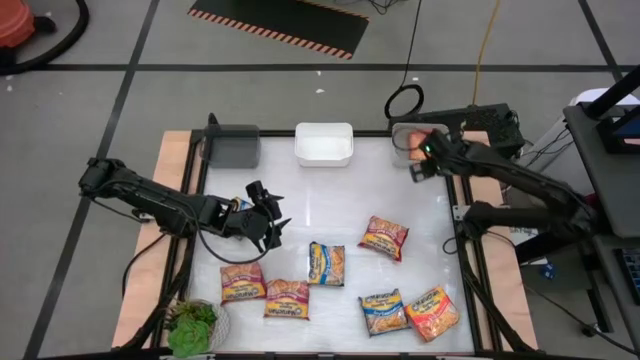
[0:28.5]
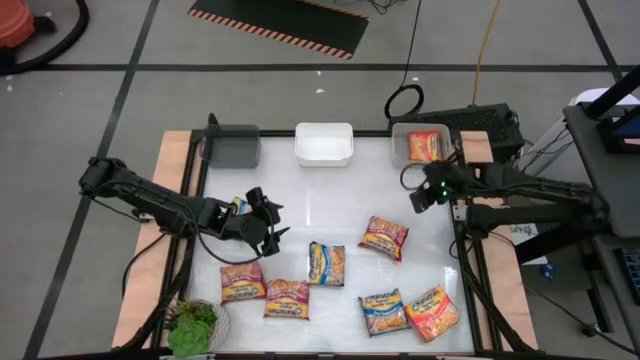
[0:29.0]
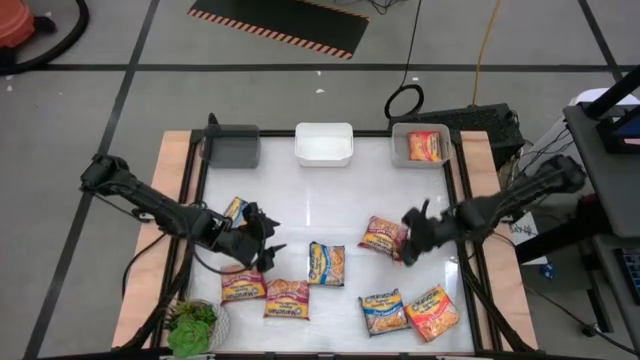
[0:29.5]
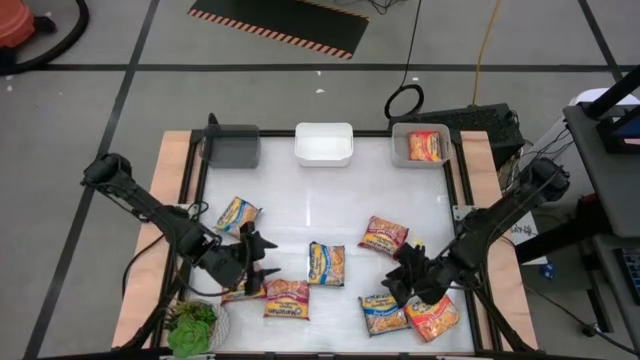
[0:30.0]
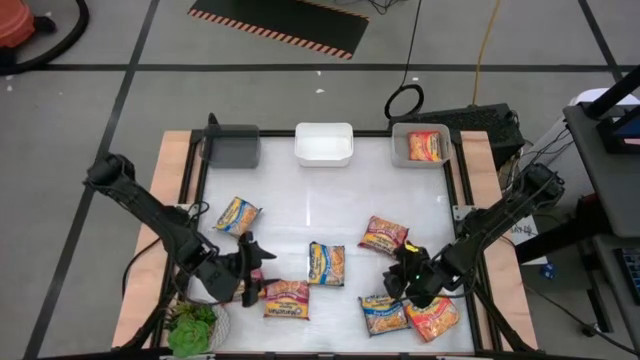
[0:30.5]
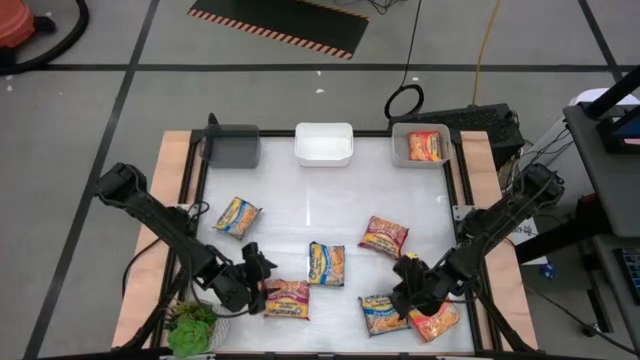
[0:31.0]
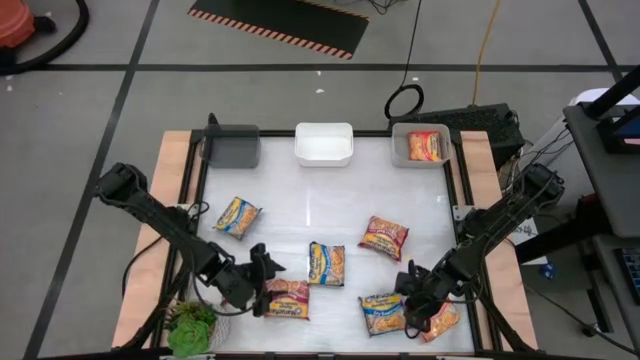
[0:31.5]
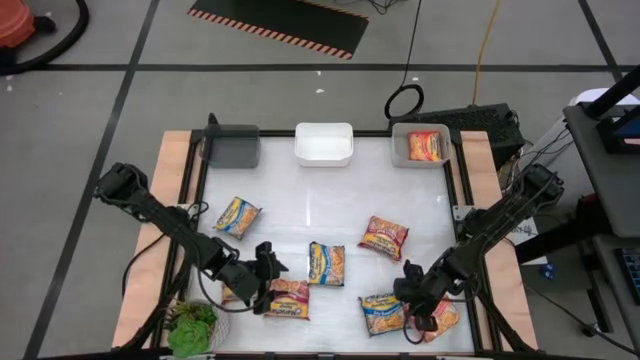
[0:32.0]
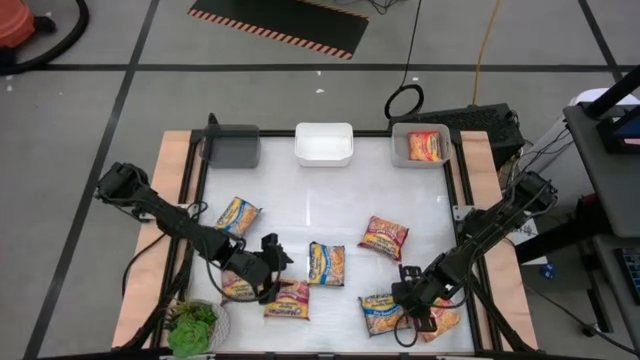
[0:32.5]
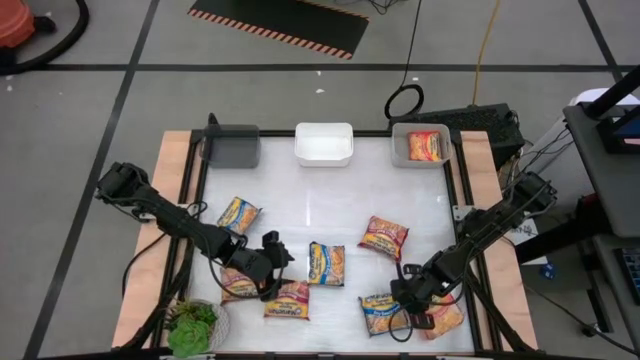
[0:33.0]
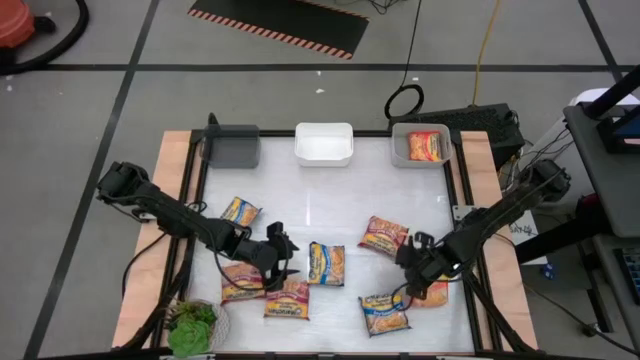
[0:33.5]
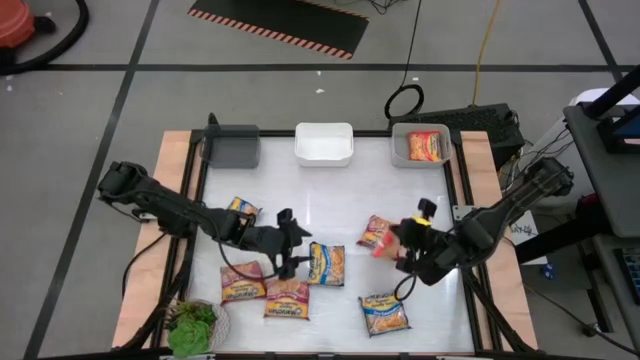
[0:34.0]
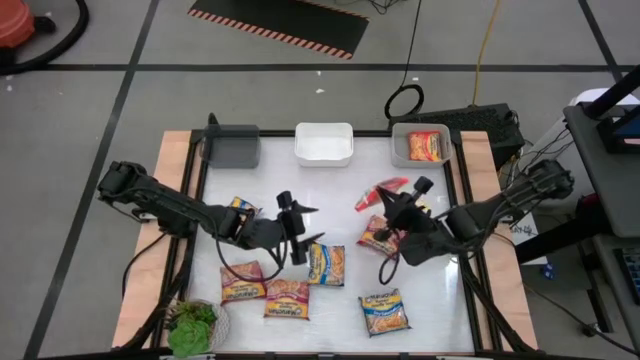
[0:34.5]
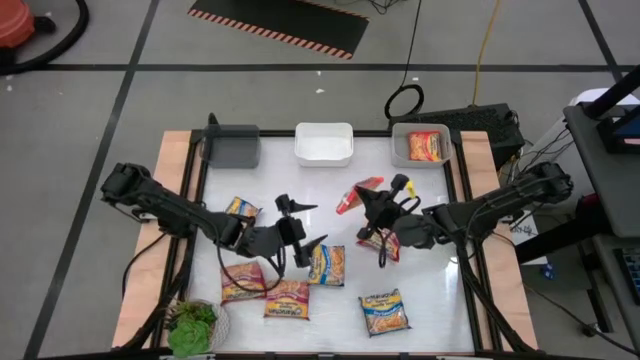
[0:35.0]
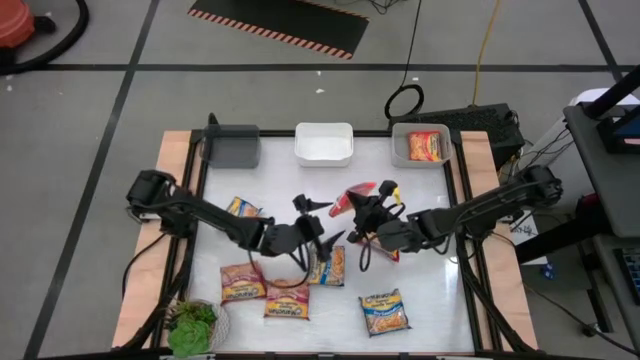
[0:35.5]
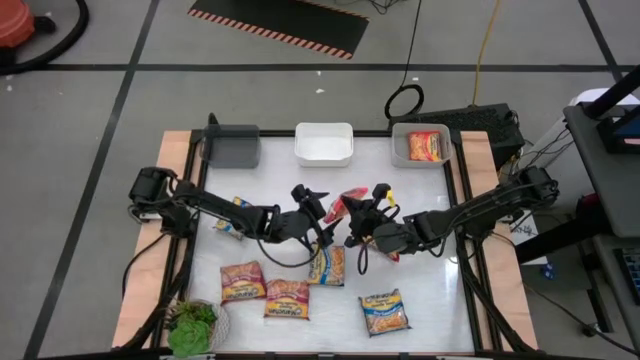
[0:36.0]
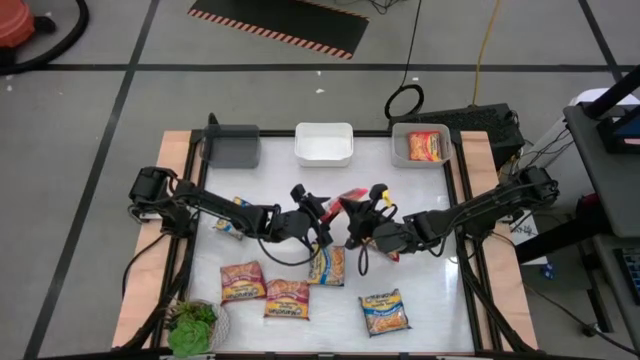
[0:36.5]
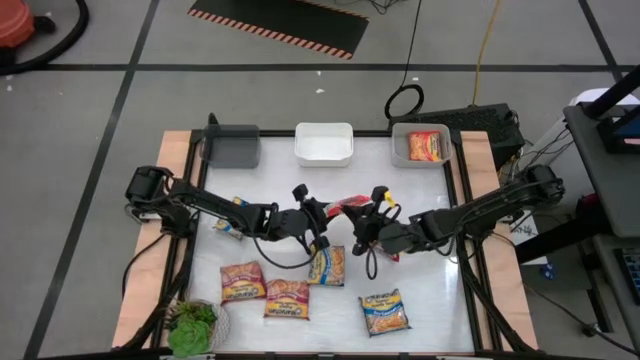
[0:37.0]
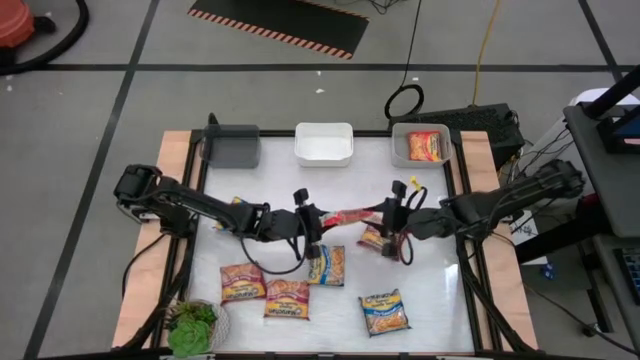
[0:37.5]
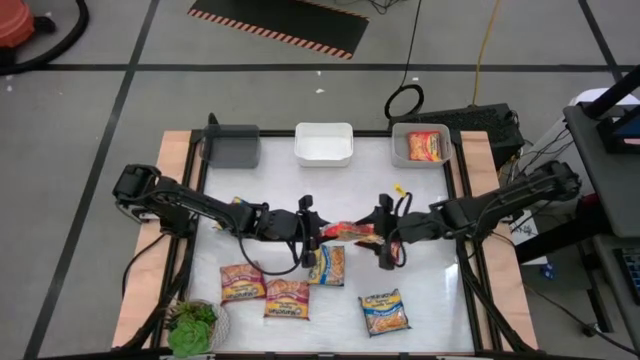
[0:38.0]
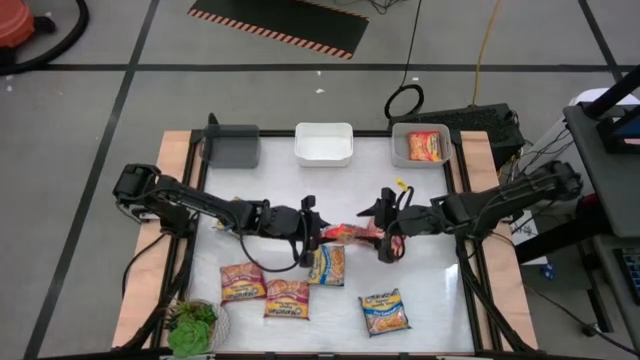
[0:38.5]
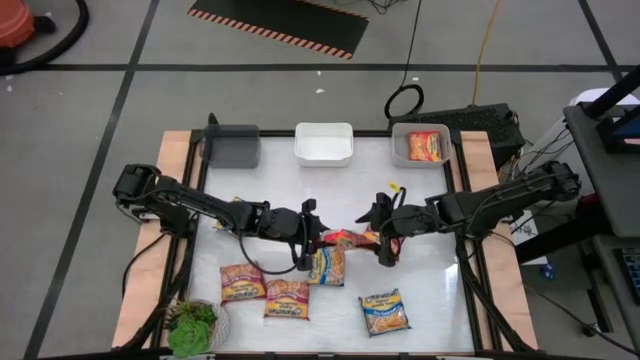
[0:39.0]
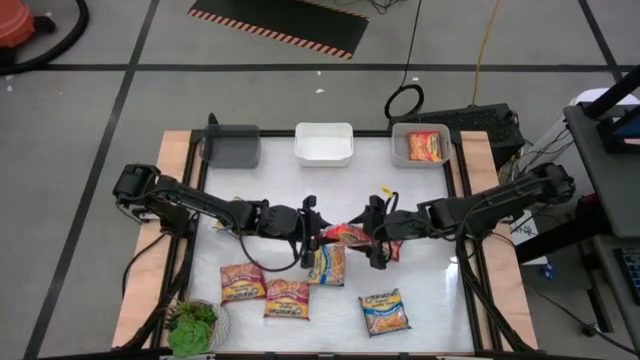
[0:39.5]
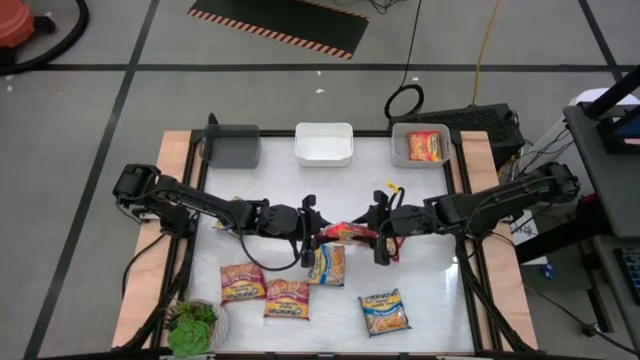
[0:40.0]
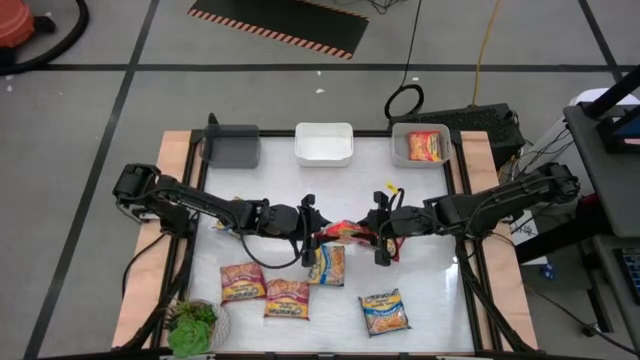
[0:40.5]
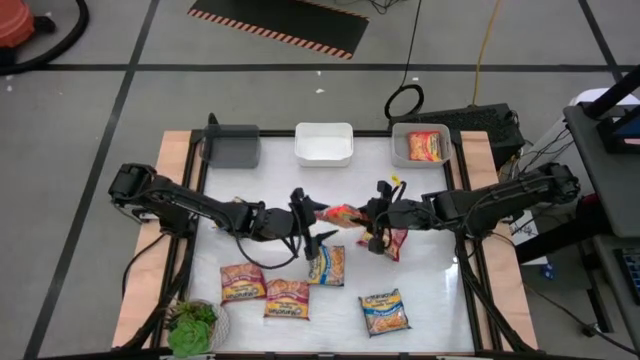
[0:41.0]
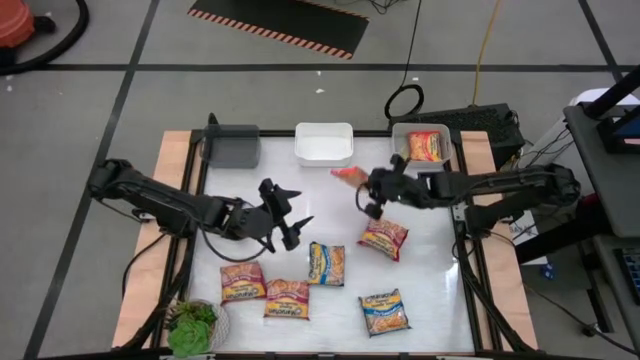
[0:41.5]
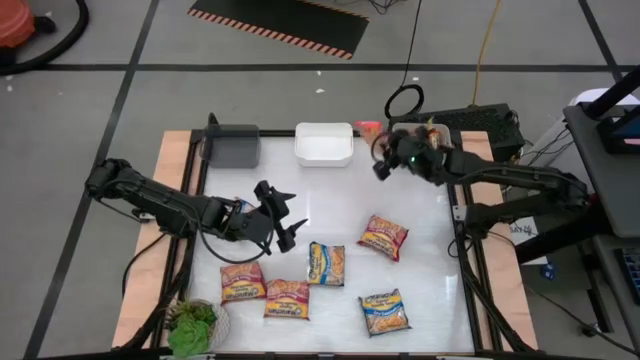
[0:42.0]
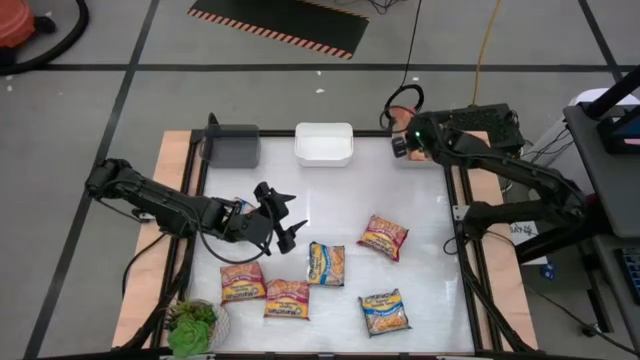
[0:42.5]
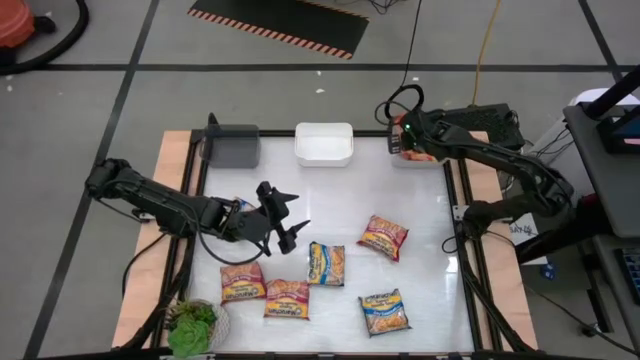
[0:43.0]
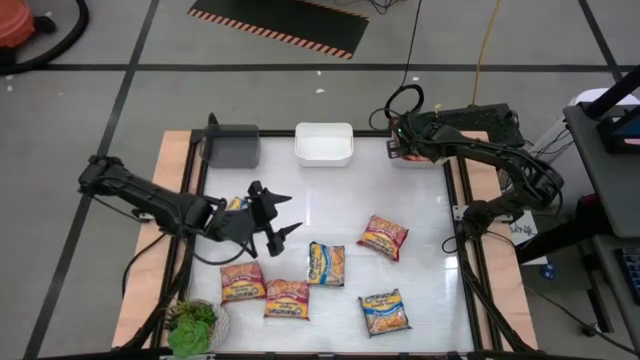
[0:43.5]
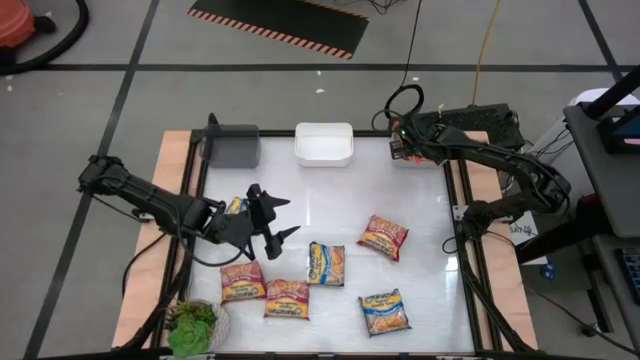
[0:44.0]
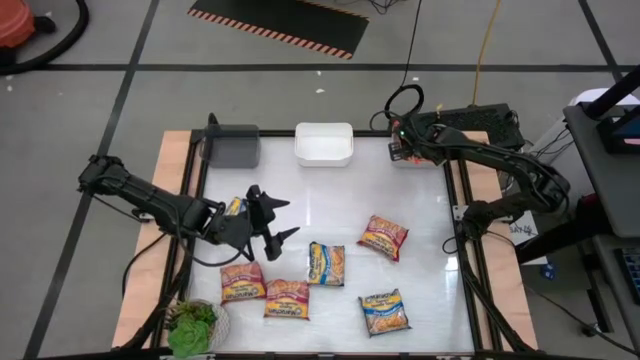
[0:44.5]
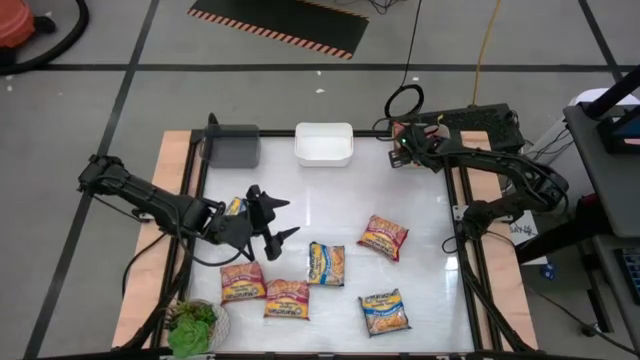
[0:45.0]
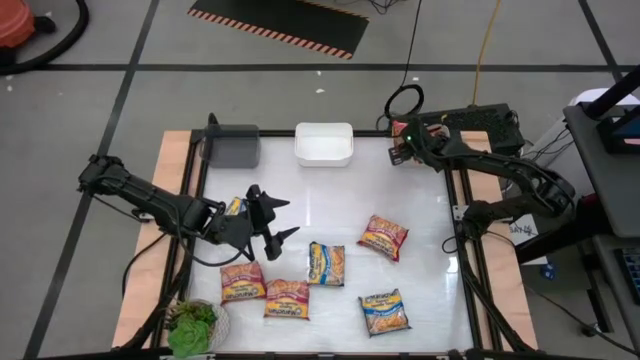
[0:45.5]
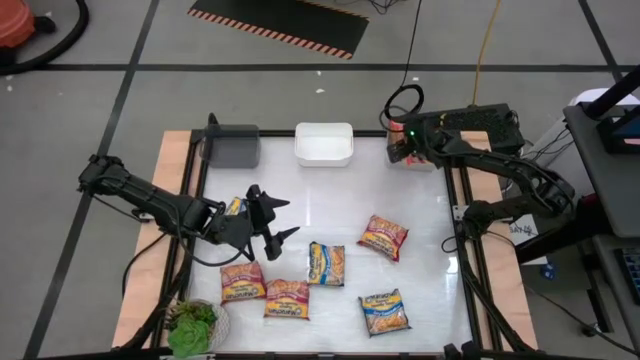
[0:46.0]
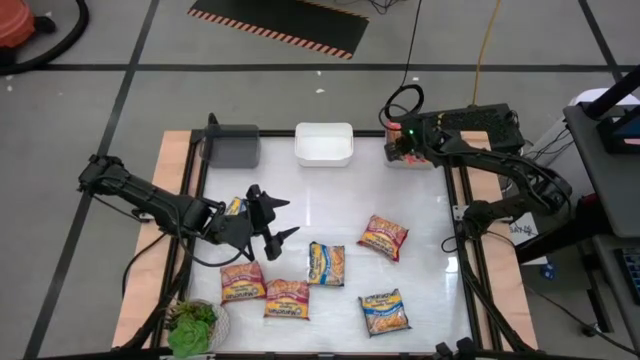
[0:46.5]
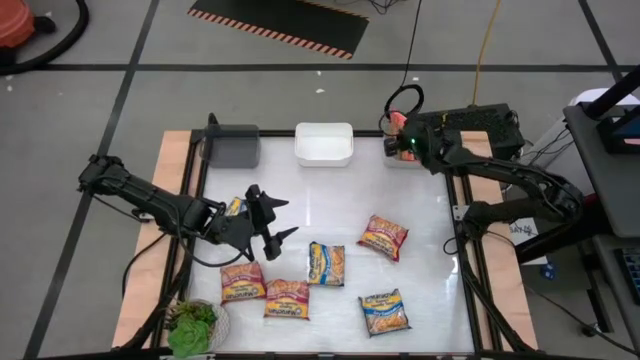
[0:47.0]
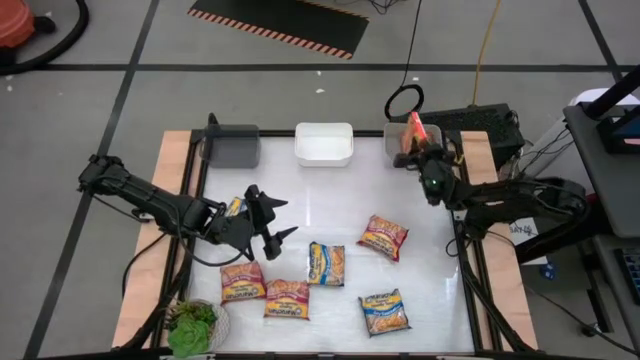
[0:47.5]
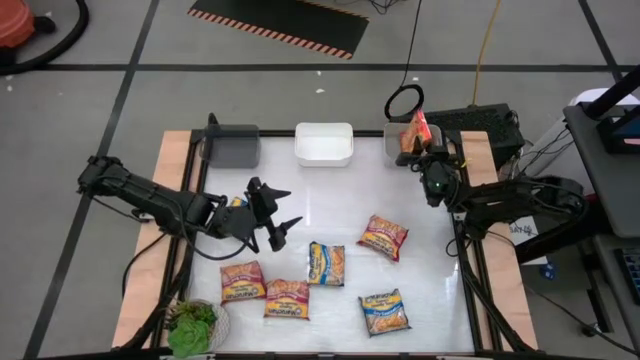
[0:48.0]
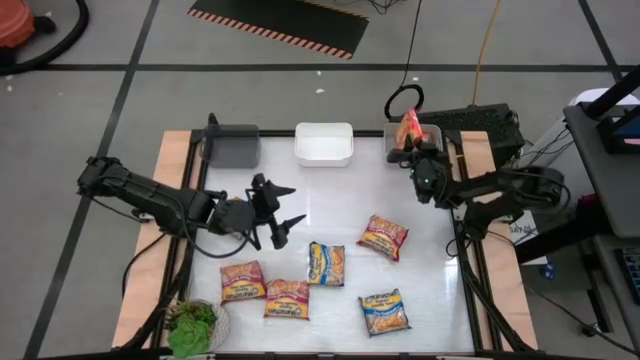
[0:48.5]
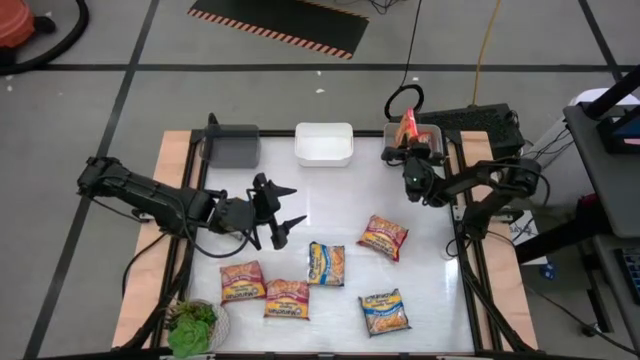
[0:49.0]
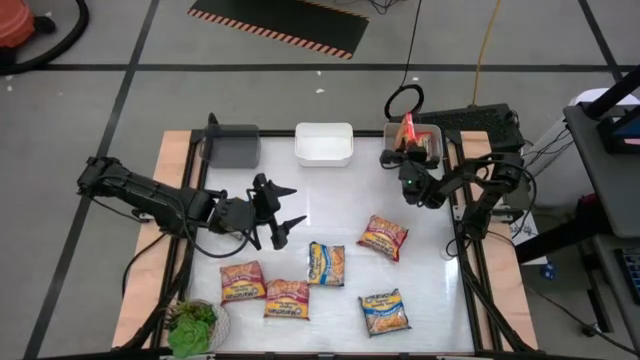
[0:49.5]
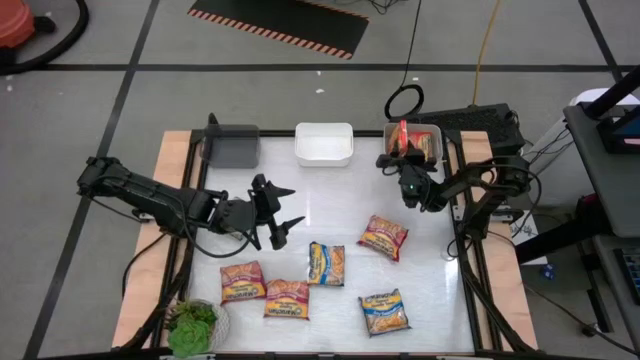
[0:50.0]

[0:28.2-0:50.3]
Task: Sort Maruchan noodles
Put the orange noodle pack into the gray bin
